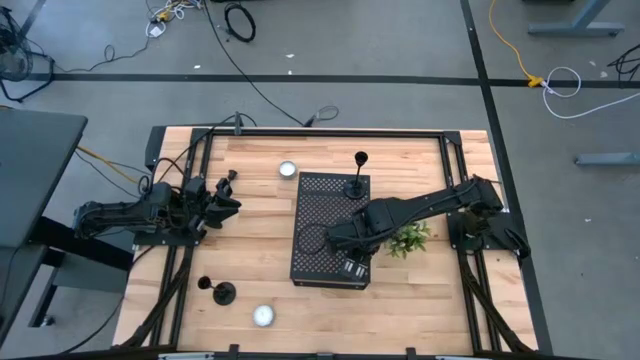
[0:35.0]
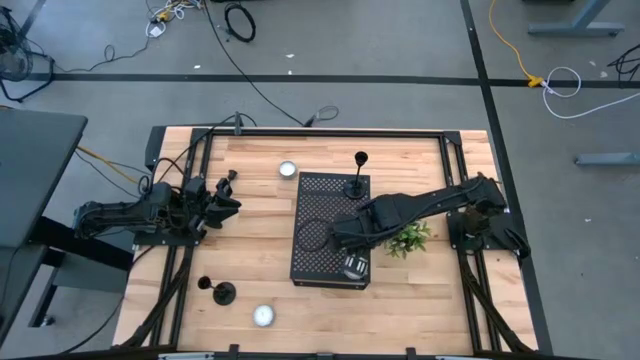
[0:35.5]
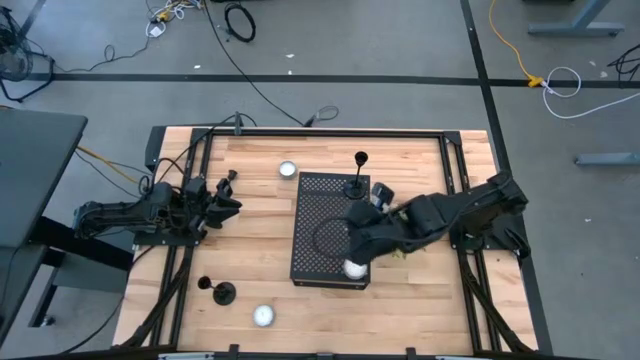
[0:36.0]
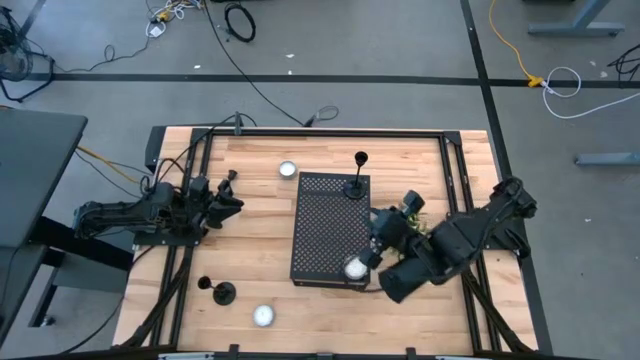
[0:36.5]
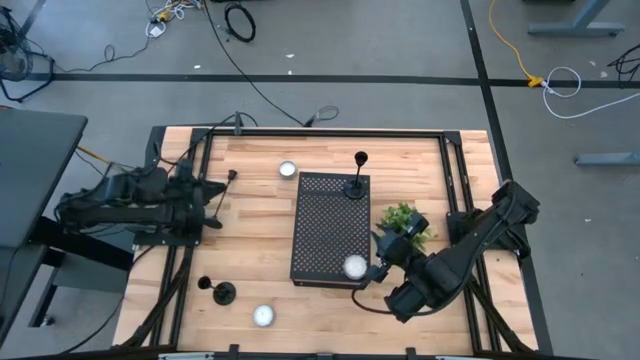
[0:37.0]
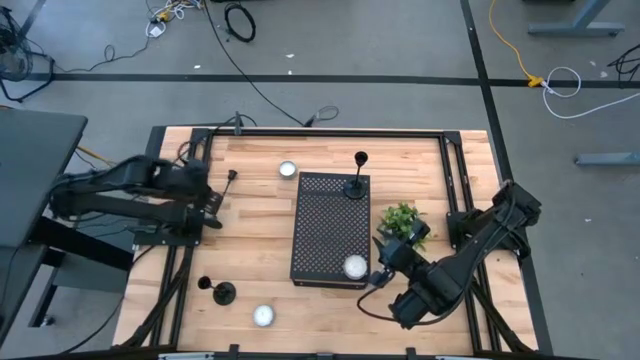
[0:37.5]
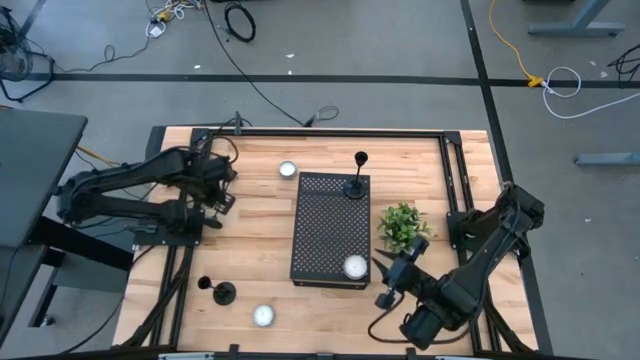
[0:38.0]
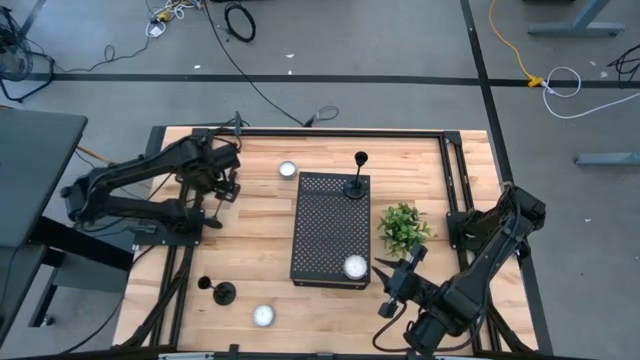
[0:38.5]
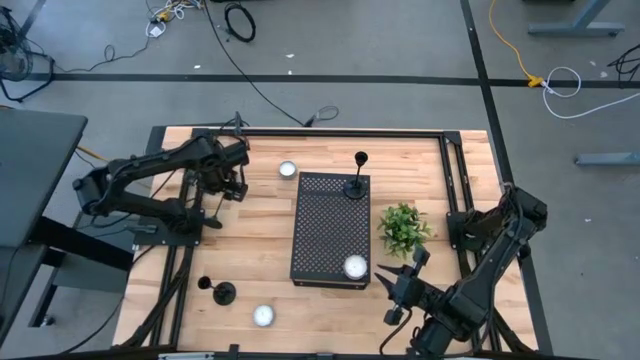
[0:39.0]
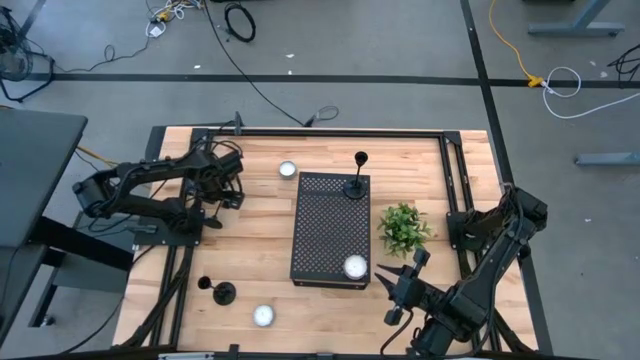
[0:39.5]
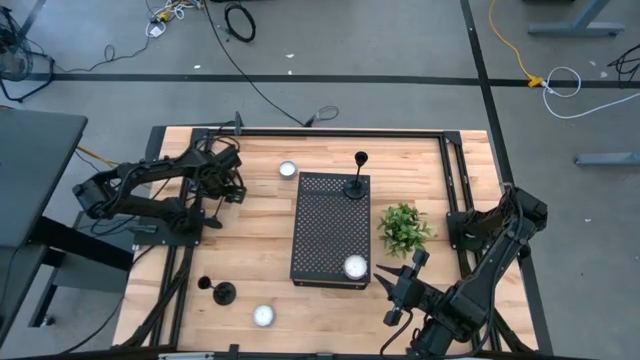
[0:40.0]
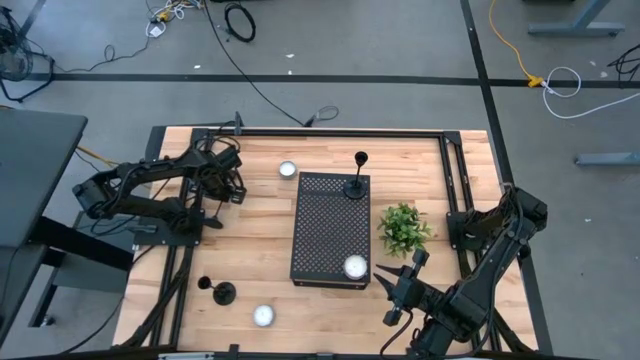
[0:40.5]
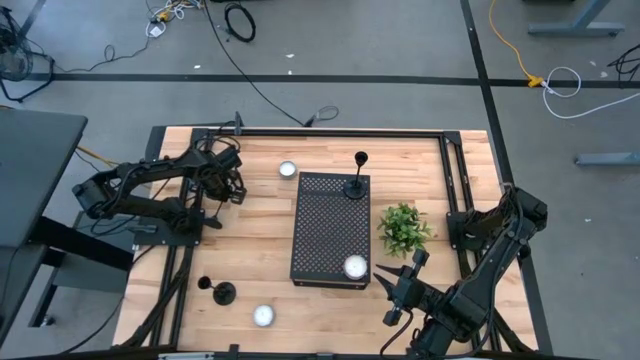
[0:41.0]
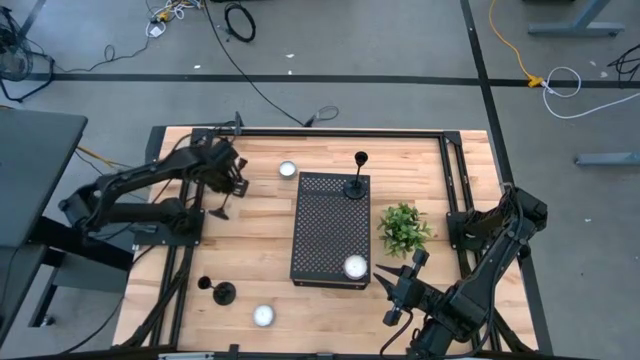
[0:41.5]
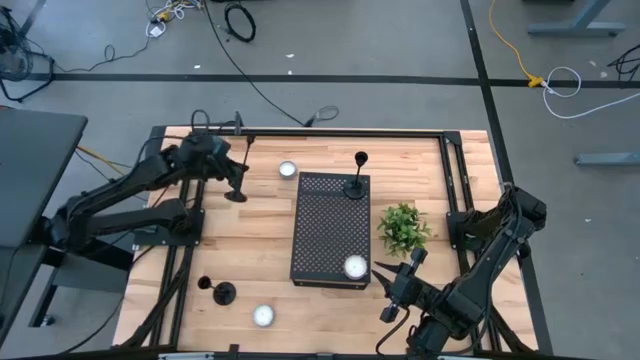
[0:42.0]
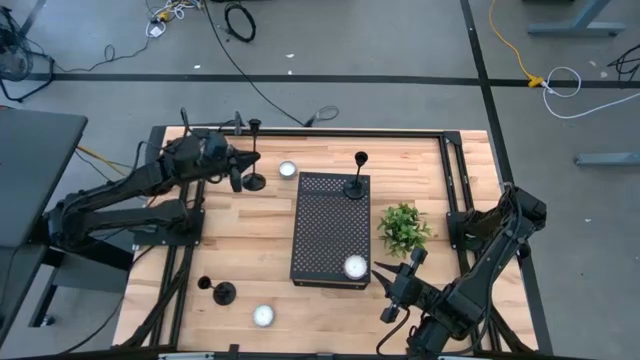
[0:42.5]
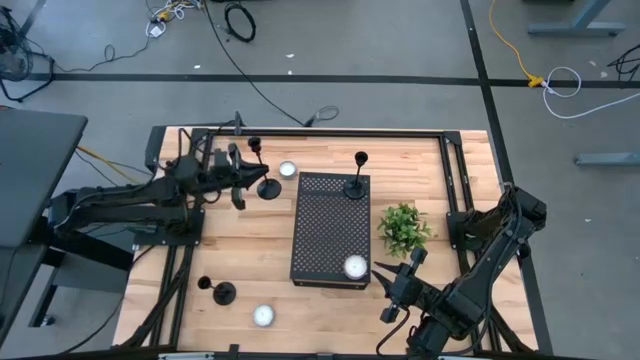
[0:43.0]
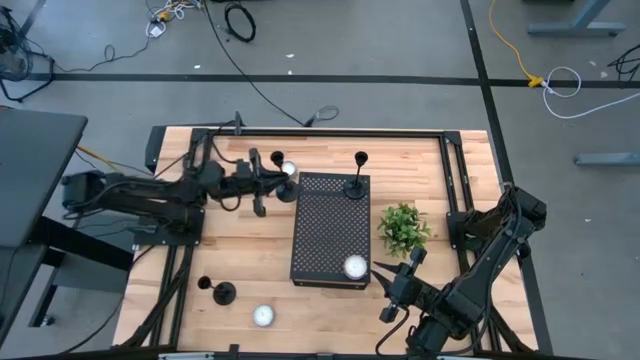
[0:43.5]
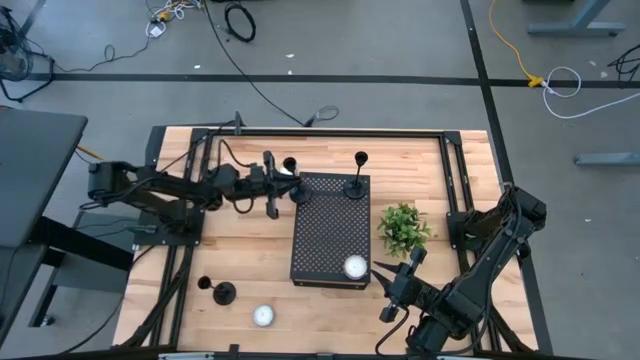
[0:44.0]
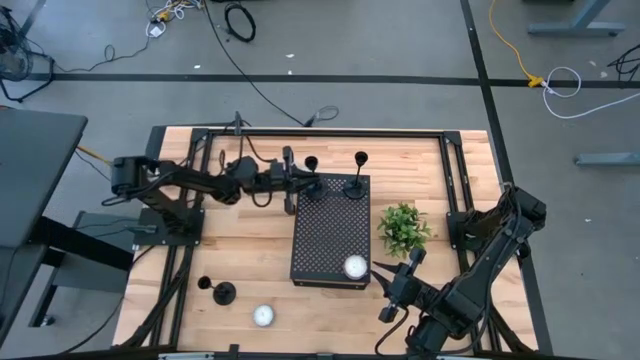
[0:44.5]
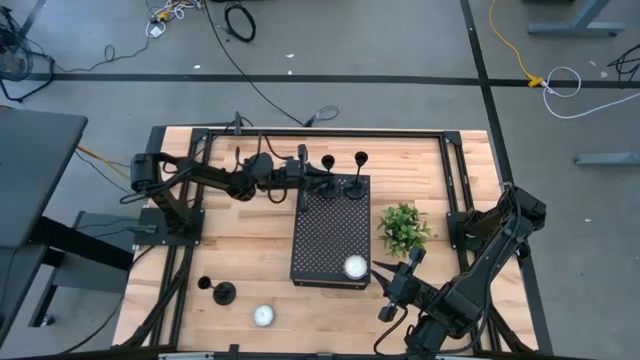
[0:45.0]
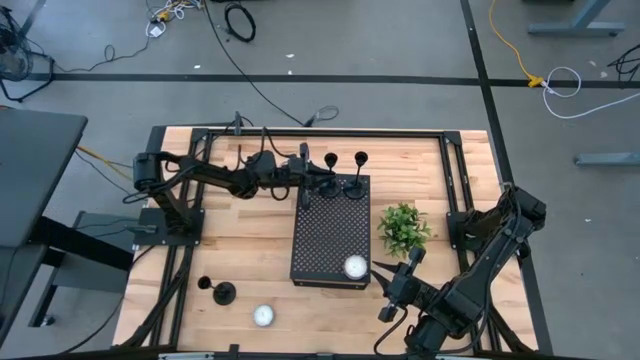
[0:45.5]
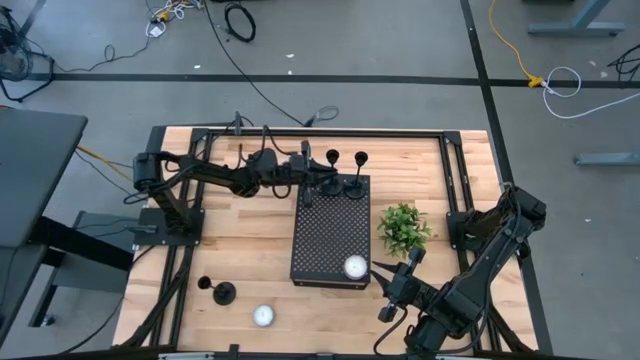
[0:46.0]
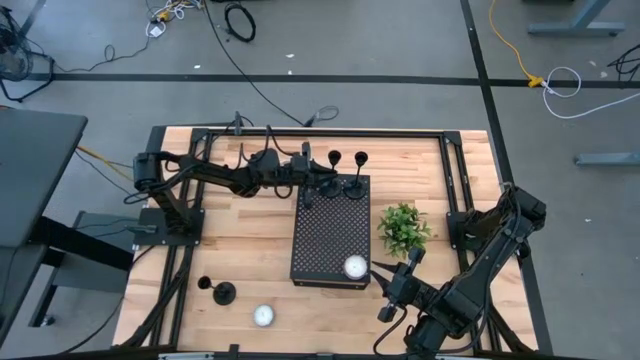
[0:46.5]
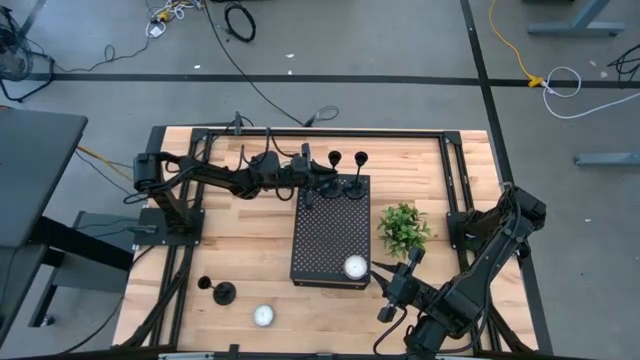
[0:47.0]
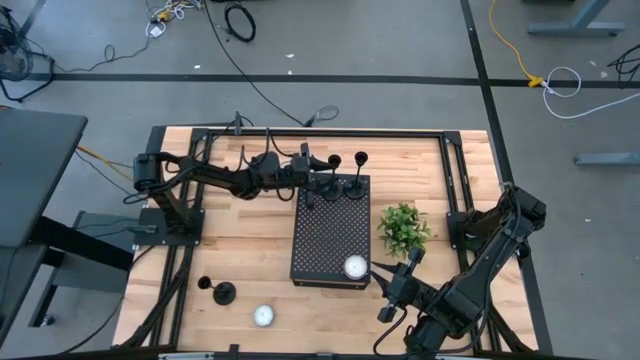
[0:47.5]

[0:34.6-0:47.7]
Task: Pick & Place candle stick holders
Put the top black candle holder on the shelf aligned with the other black candle holder

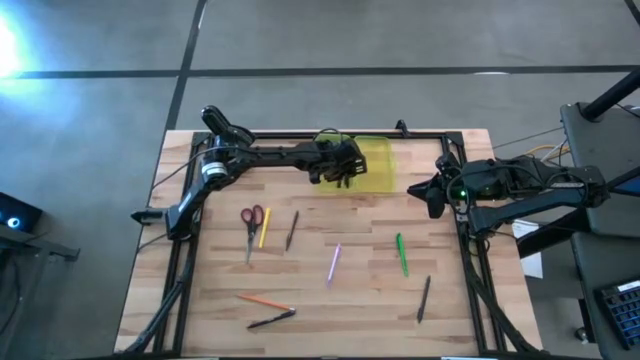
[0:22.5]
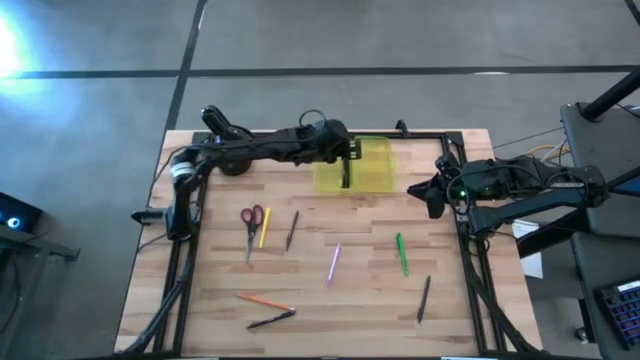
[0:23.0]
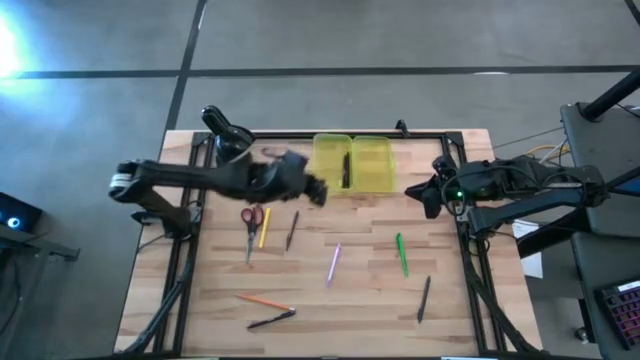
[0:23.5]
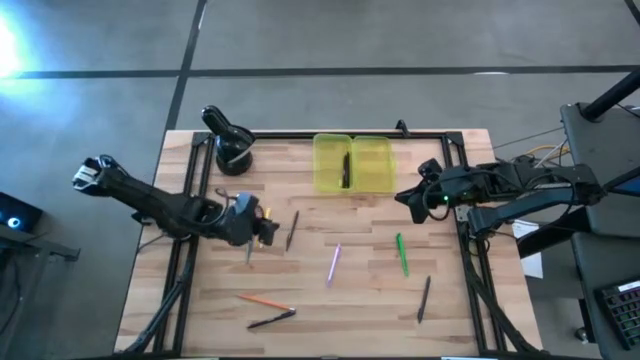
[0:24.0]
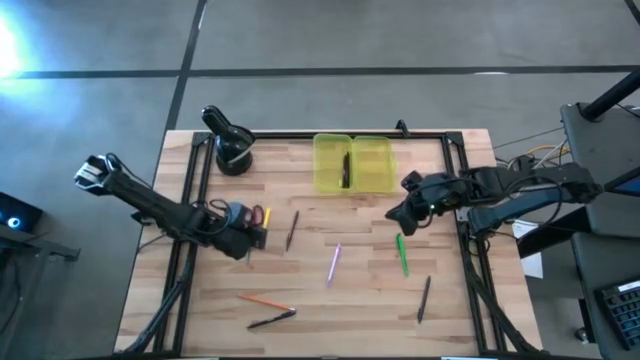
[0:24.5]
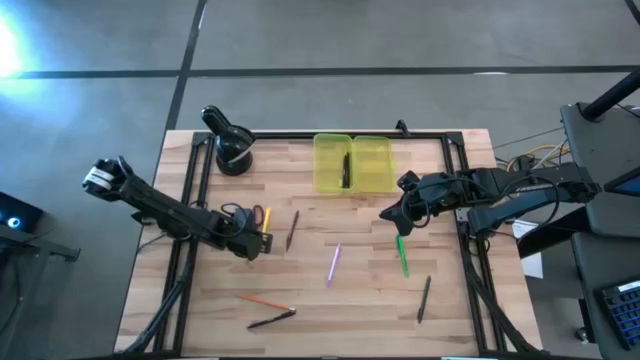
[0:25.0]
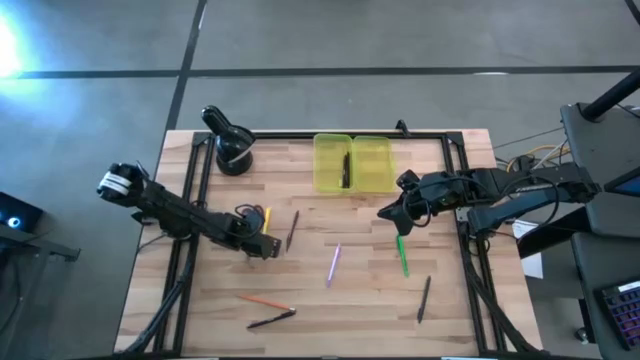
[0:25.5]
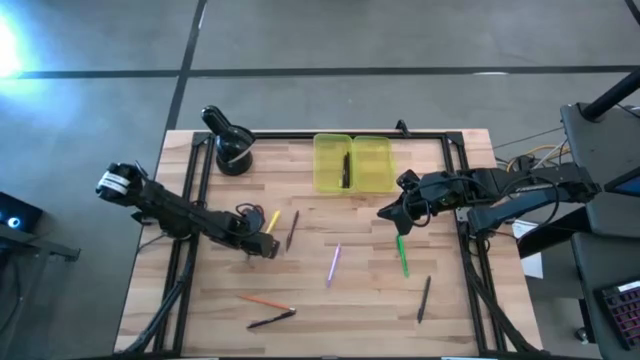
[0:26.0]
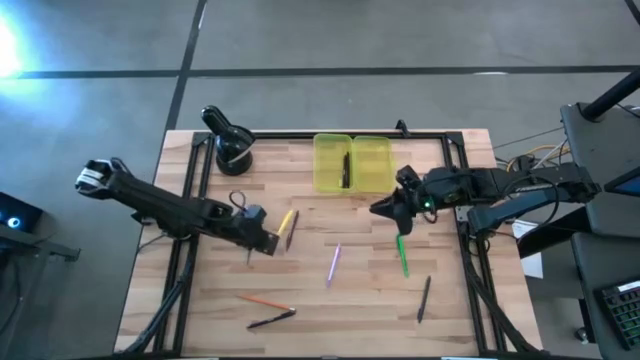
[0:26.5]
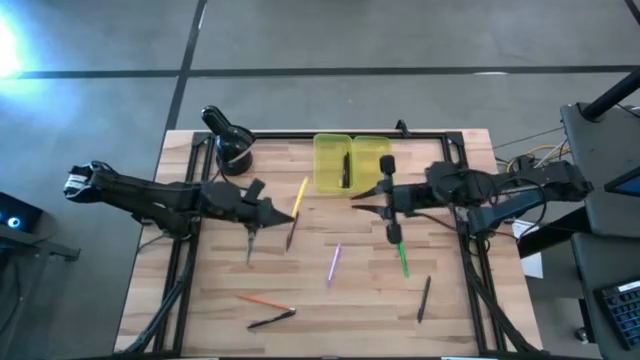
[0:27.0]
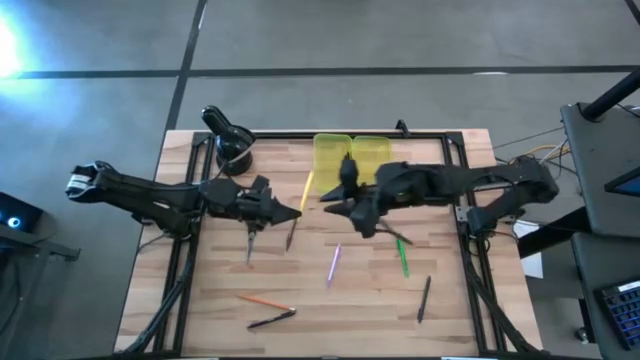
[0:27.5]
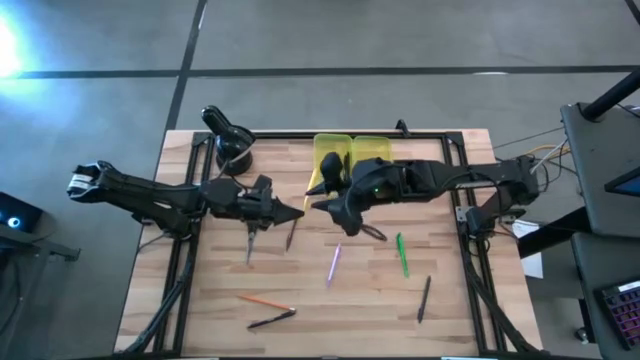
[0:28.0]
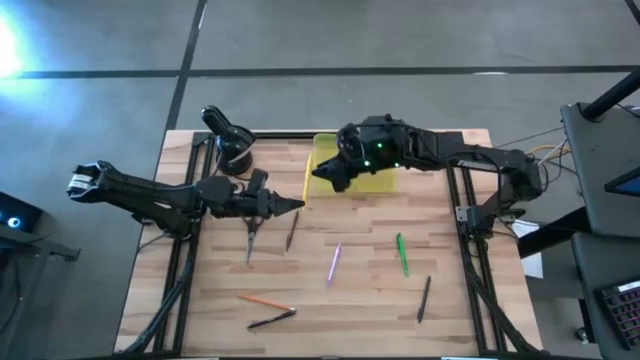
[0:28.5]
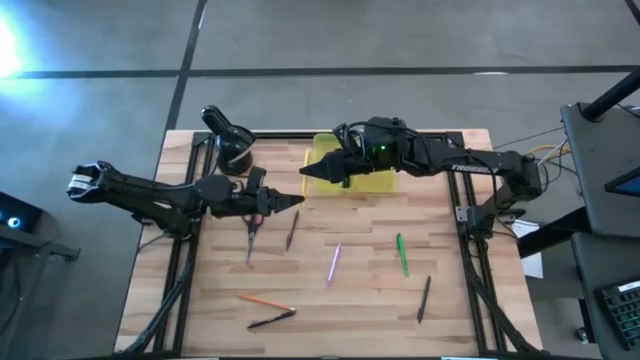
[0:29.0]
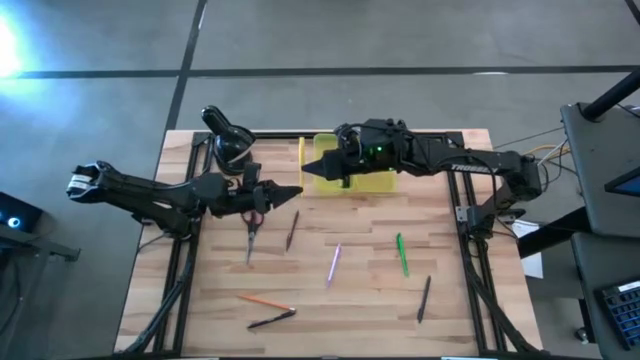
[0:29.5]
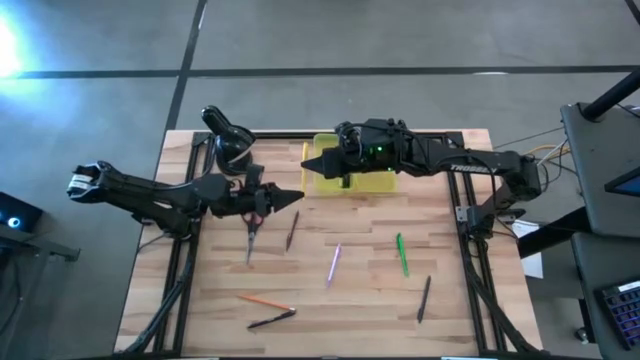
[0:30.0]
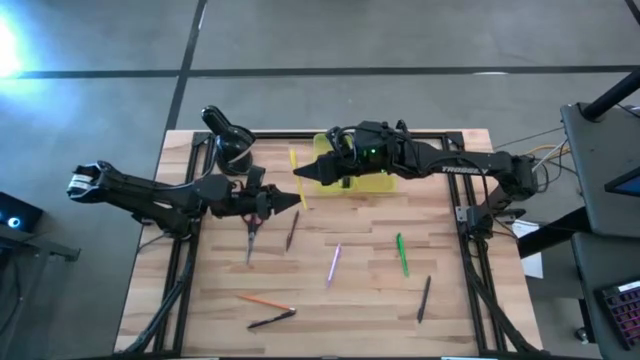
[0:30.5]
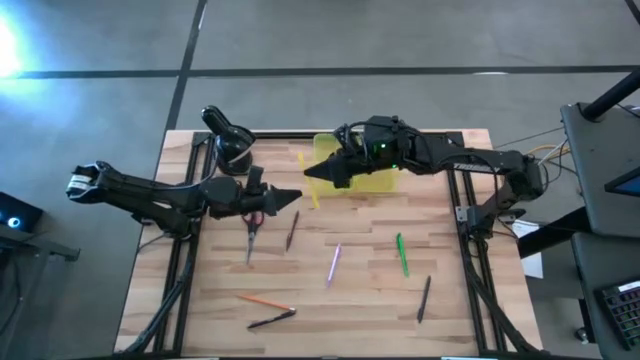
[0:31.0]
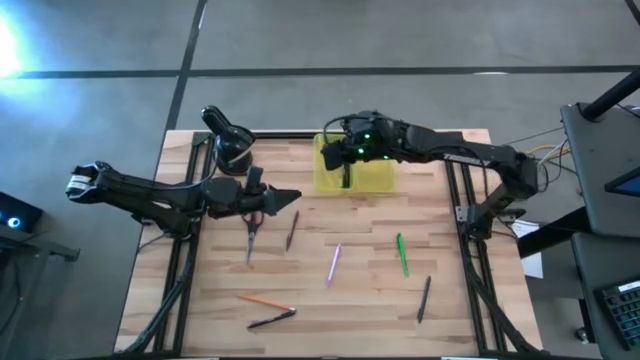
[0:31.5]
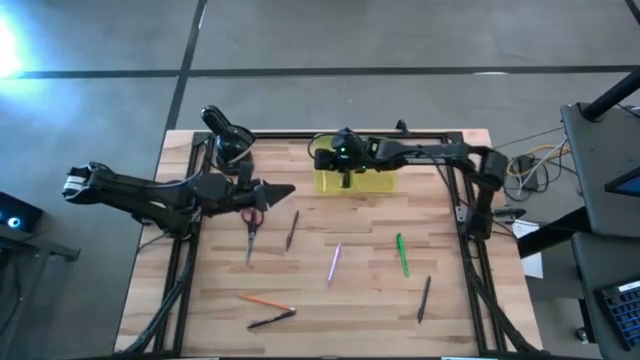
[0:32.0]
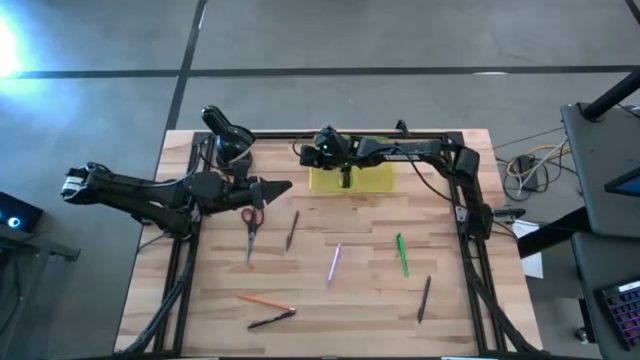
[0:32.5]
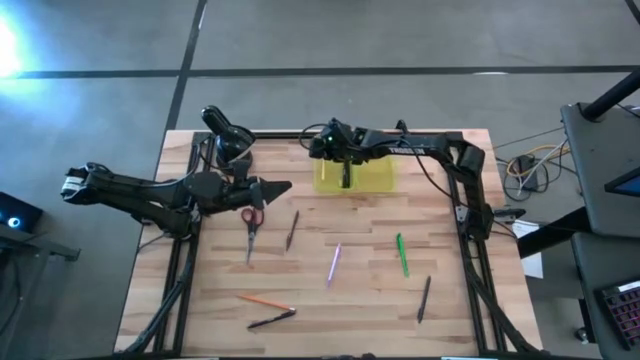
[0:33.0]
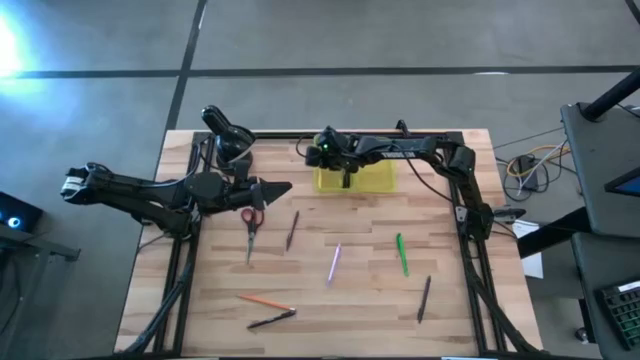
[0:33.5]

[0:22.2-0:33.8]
Task: Pick & place school supplies into a supply box
Put the yellow pen into the yellow supply box
